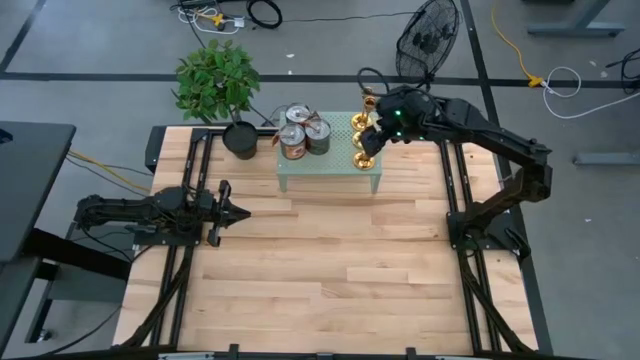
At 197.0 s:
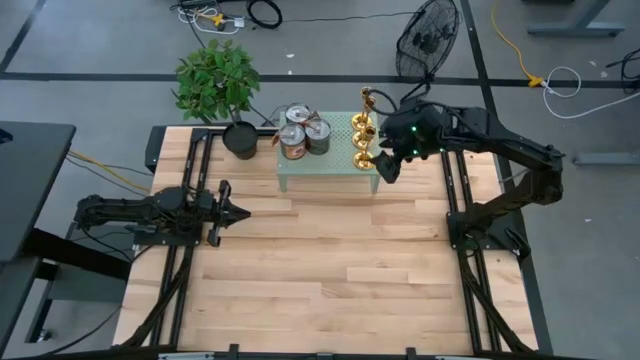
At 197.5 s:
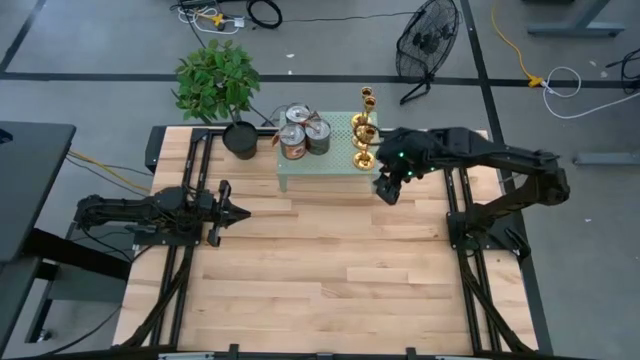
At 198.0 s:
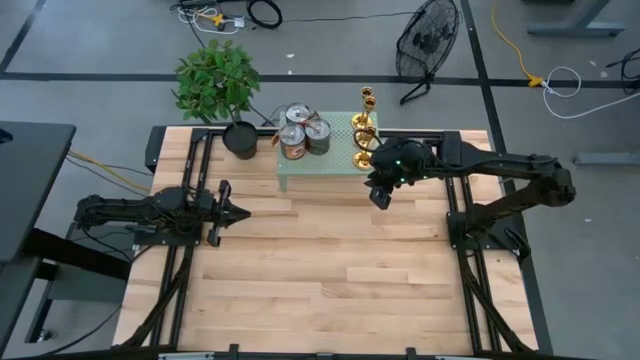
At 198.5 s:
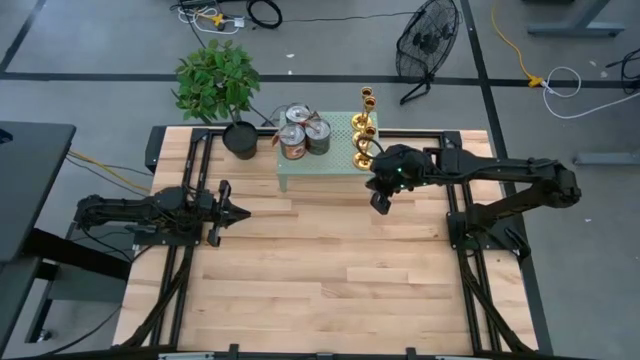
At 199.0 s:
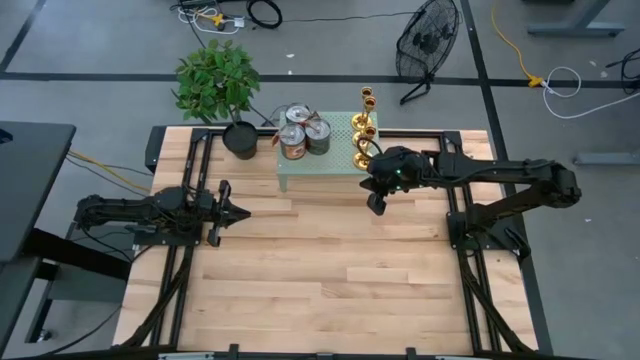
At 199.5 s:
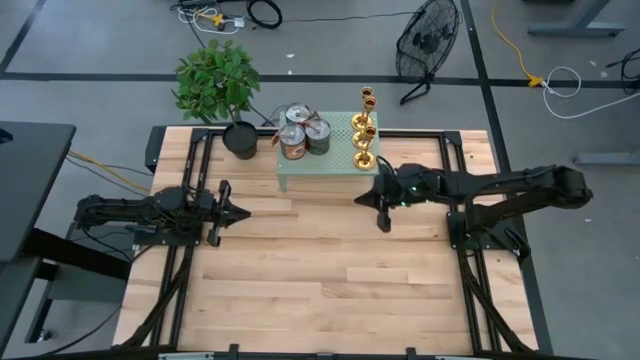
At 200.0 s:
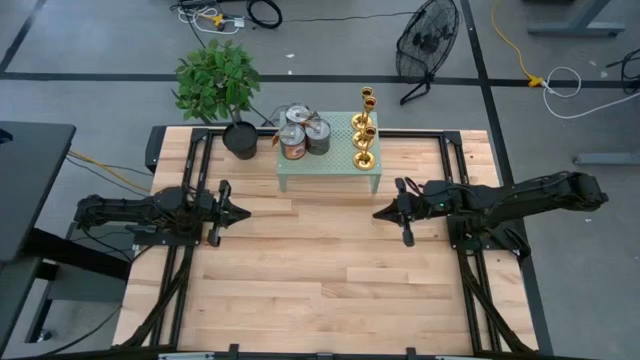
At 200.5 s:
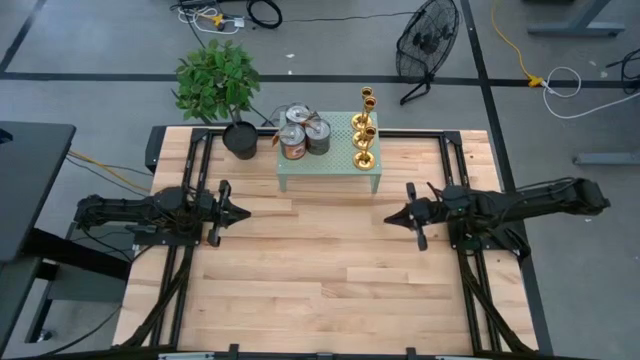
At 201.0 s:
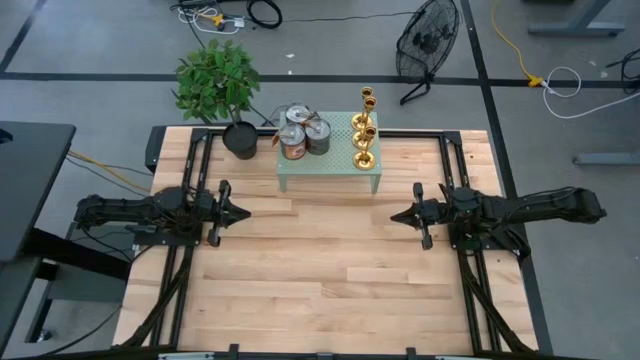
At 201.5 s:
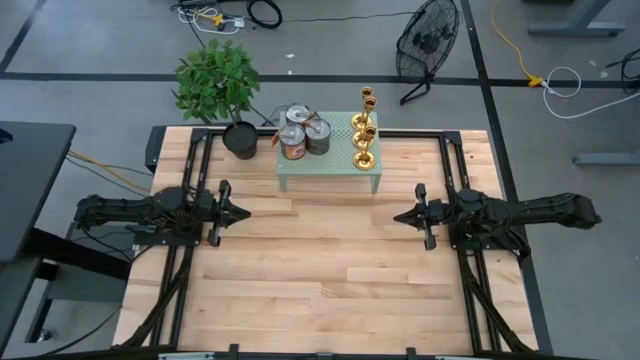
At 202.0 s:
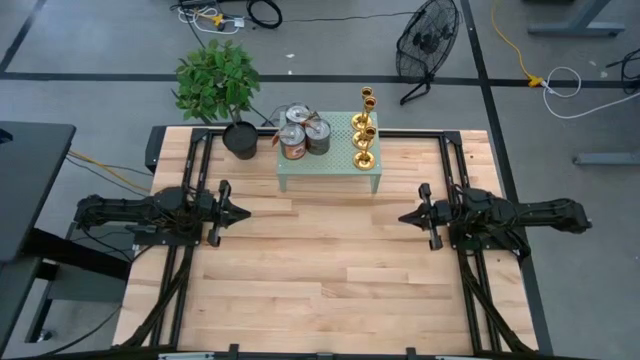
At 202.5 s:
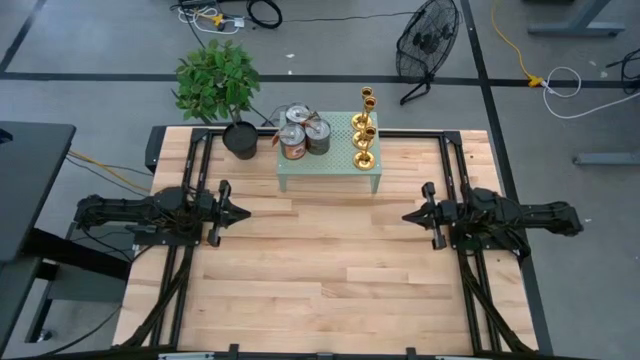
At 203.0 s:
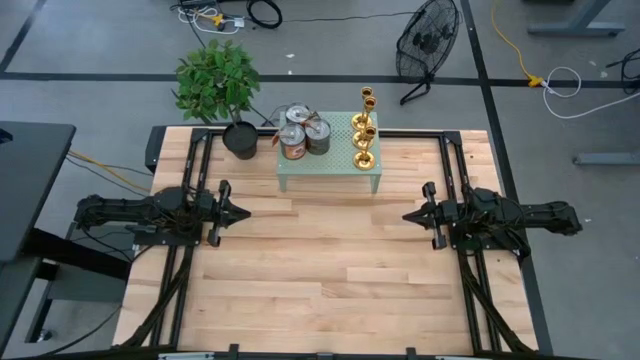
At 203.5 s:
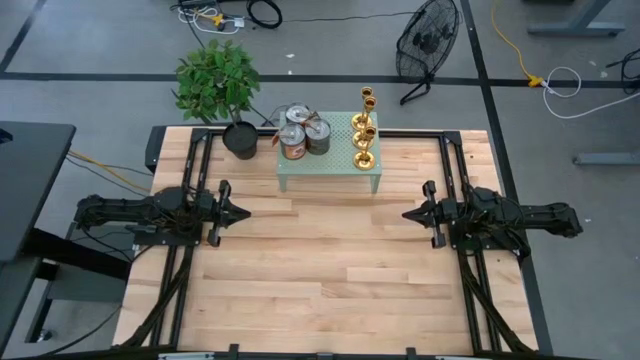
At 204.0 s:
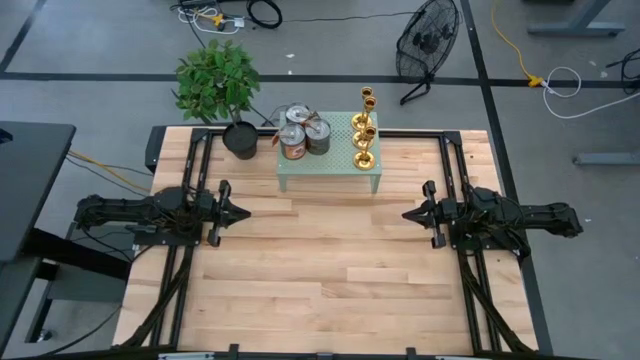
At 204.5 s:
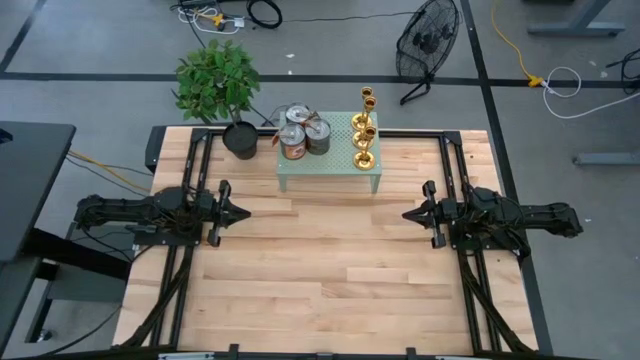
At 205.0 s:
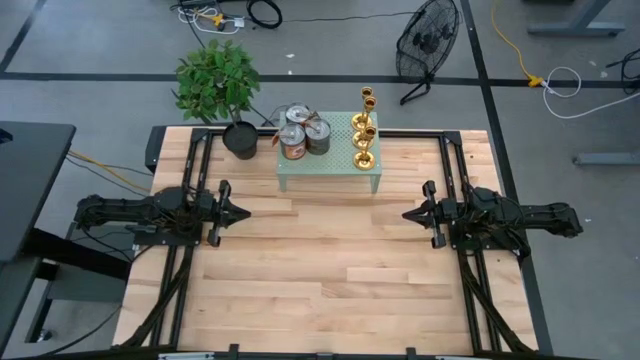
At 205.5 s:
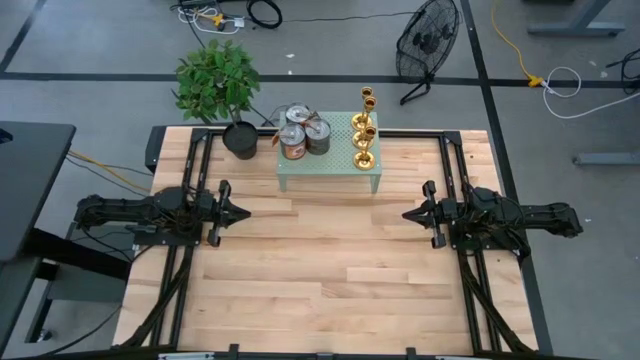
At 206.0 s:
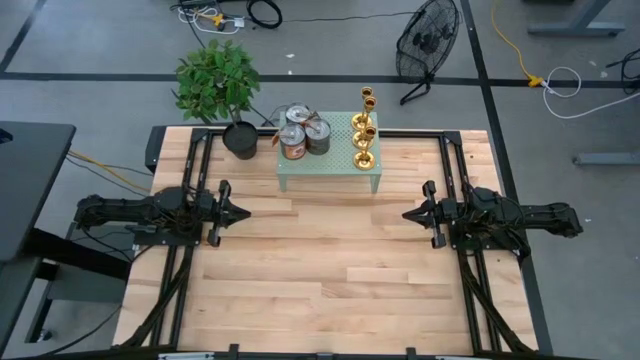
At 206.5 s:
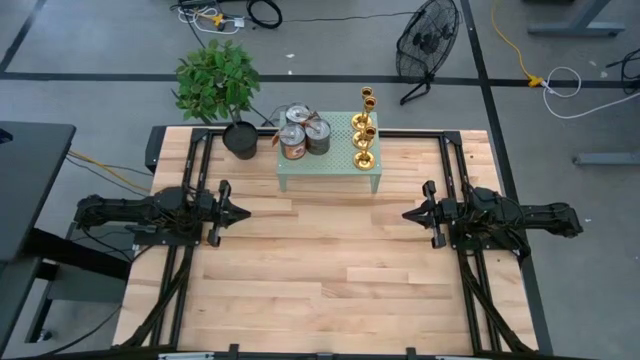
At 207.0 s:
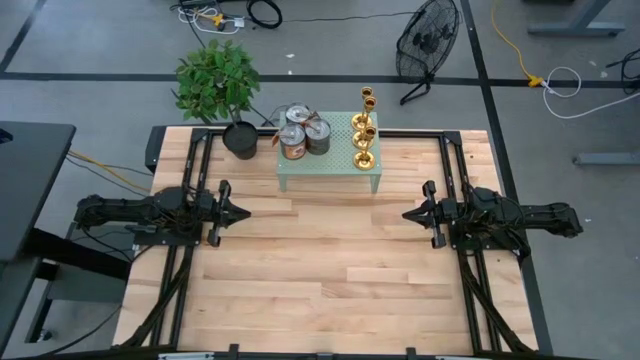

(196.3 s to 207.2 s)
Task: Pick & Place candle stick holders
Return to Home Position

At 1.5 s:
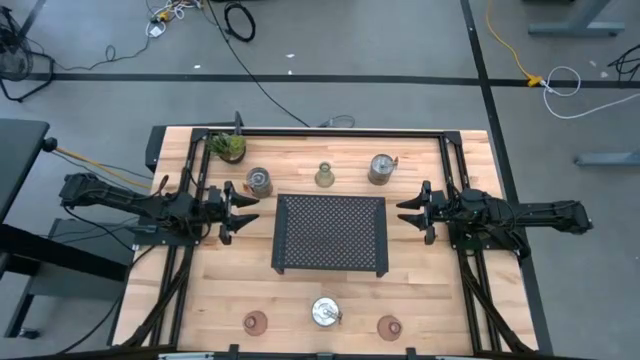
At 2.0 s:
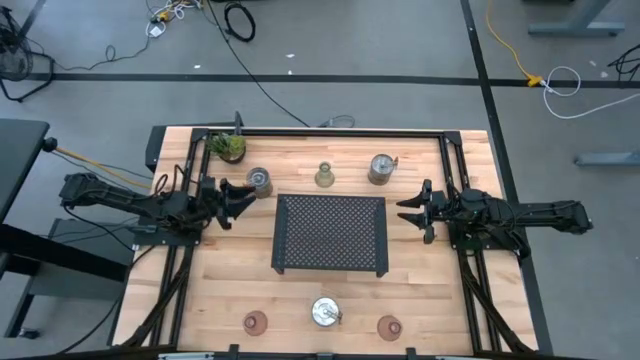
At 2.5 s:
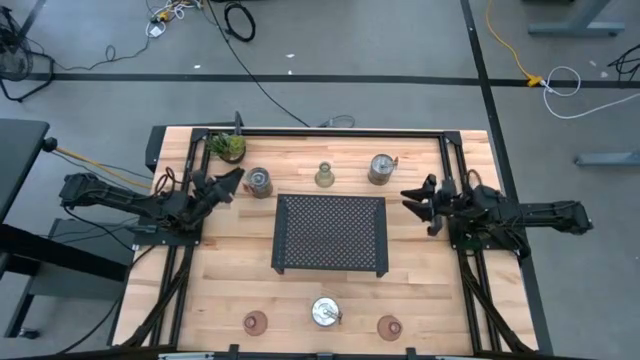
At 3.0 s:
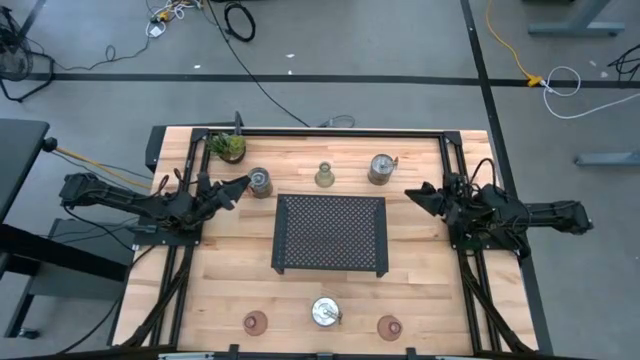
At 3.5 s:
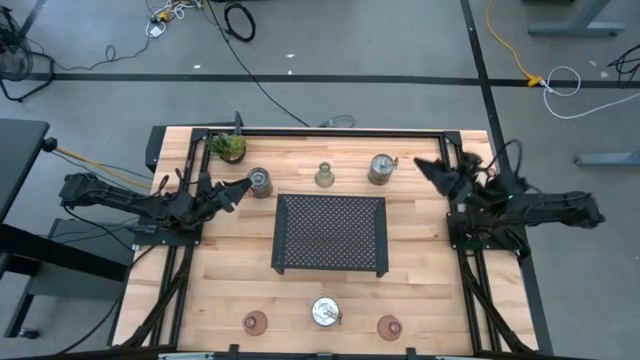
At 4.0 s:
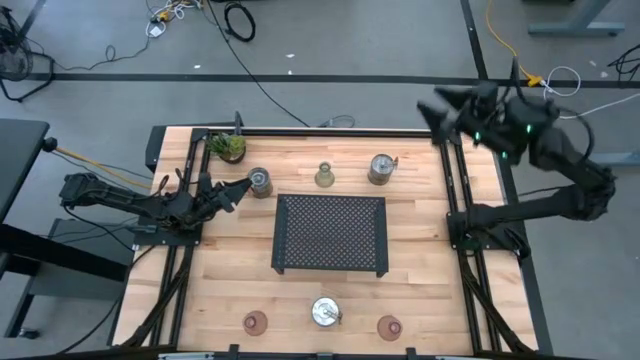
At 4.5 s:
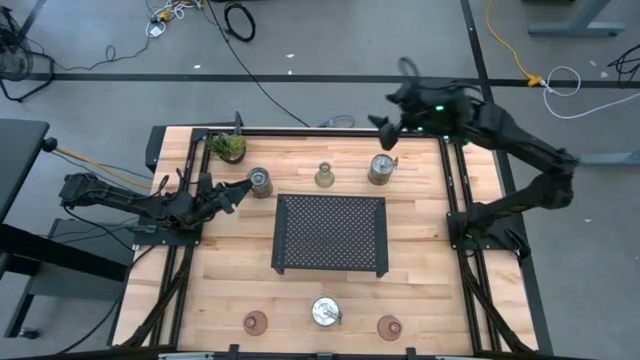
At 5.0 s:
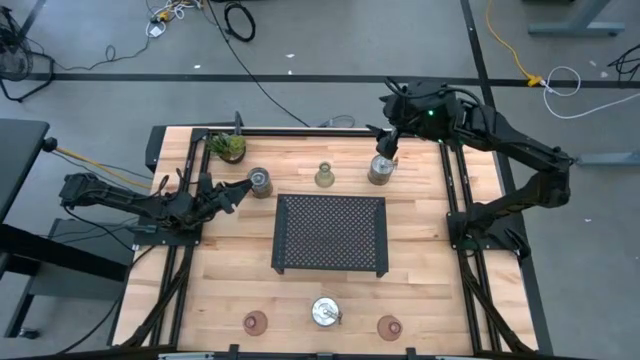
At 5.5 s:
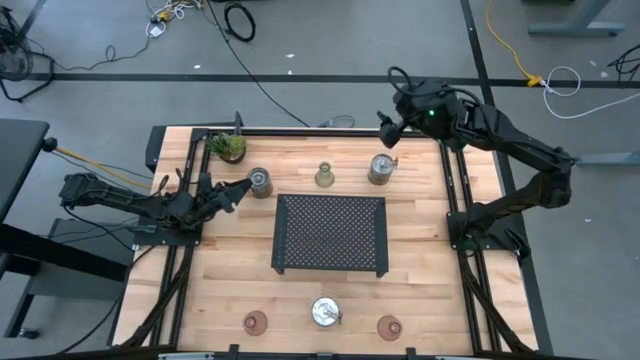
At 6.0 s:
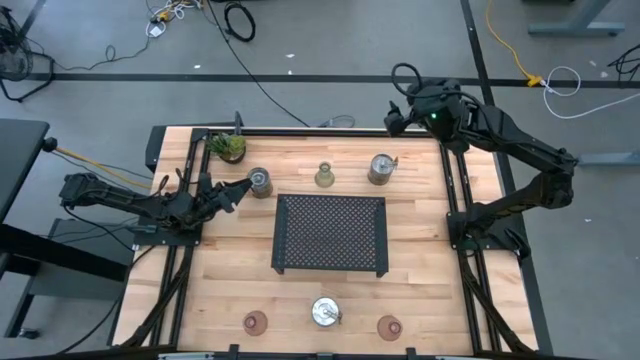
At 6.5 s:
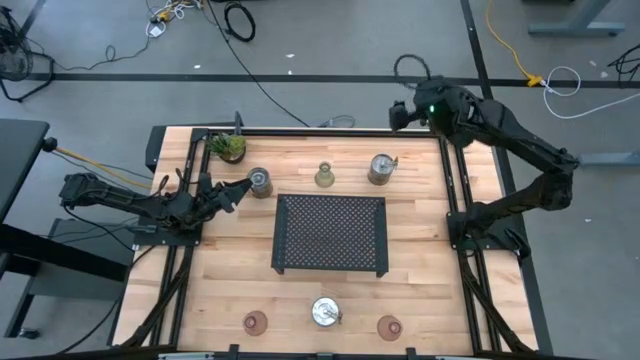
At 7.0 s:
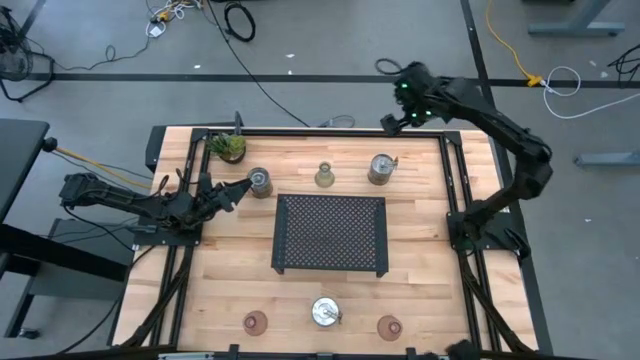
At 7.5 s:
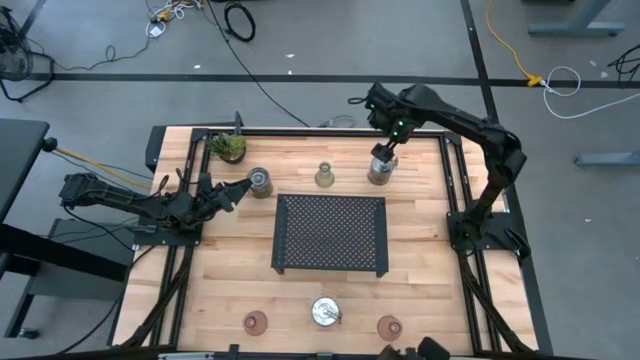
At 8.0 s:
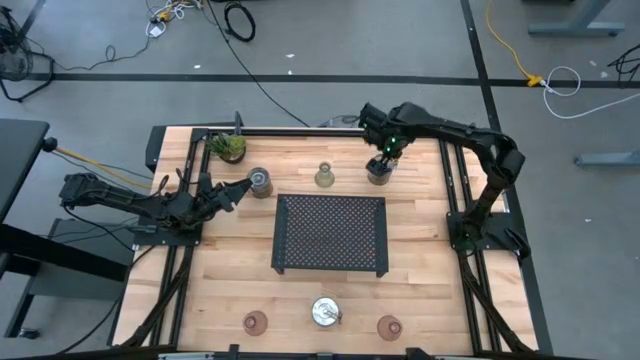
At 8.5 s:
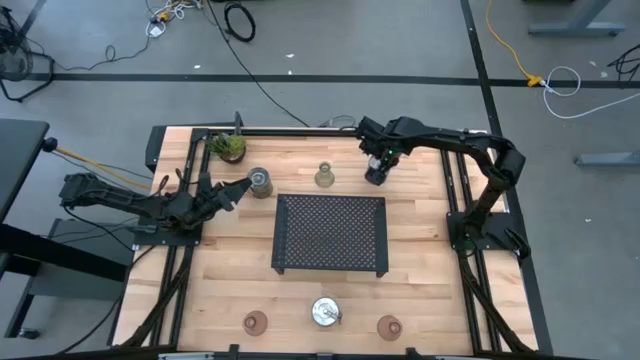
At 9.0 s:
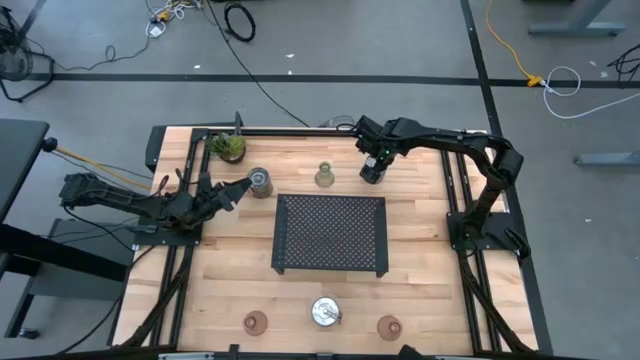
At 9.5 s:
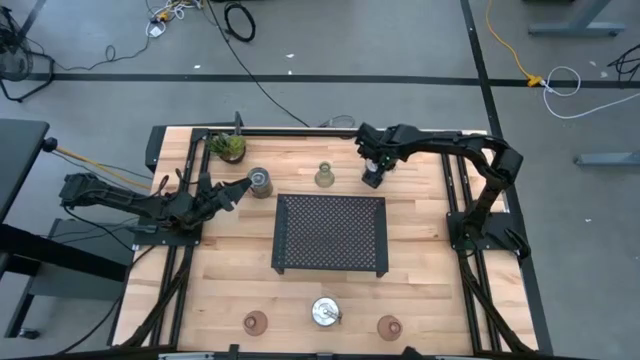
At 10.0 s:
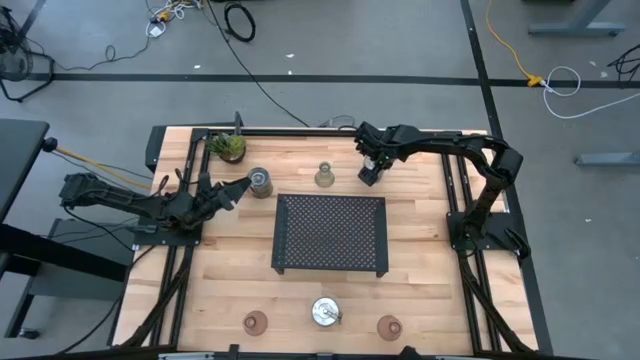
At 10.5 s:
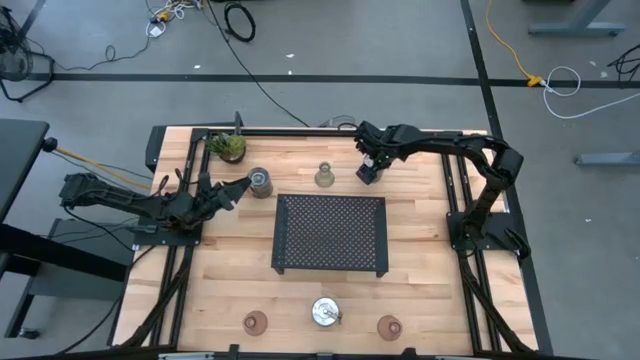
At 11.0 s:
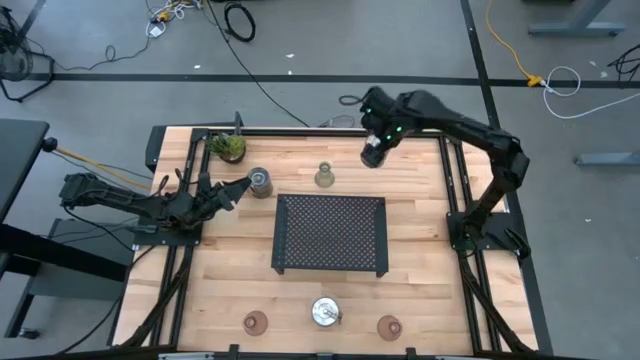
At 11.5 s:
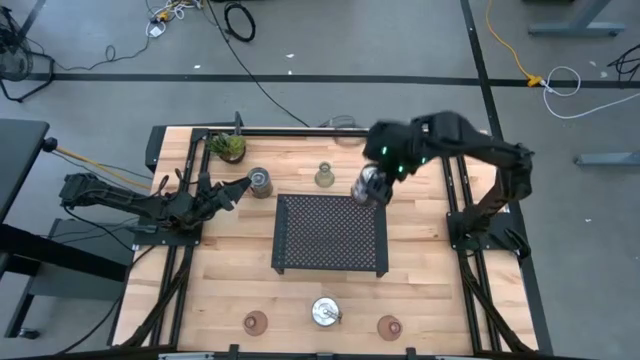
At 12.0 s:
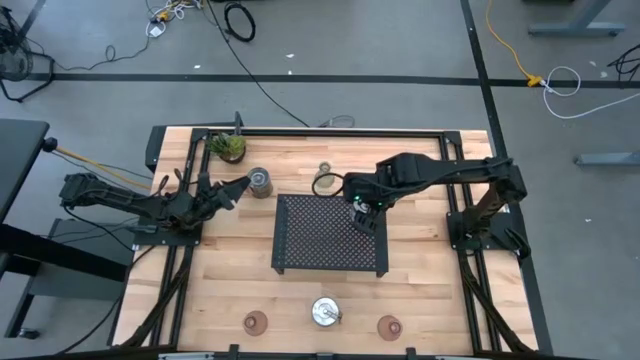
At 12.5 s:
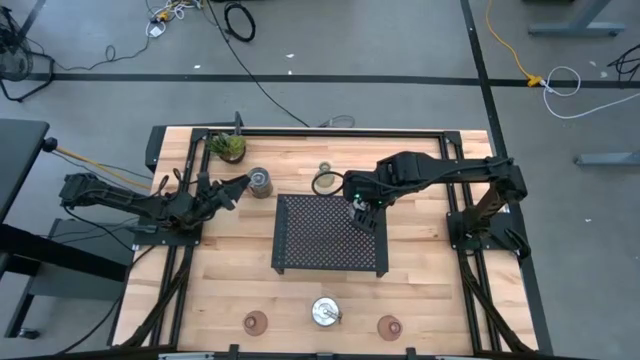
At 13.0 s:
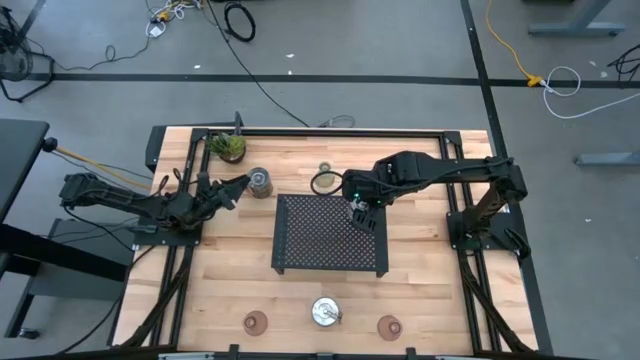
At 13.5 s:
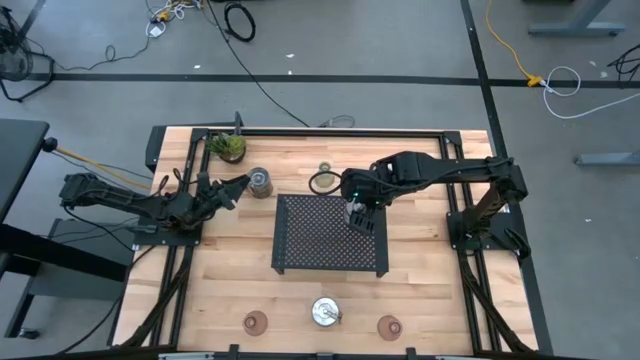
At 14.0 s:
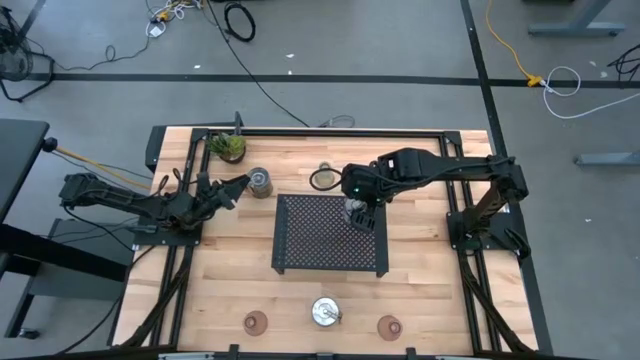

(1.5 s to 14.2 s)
Task: Pick & Place candle stick holders
Put the top silver scented candle on the shelf
